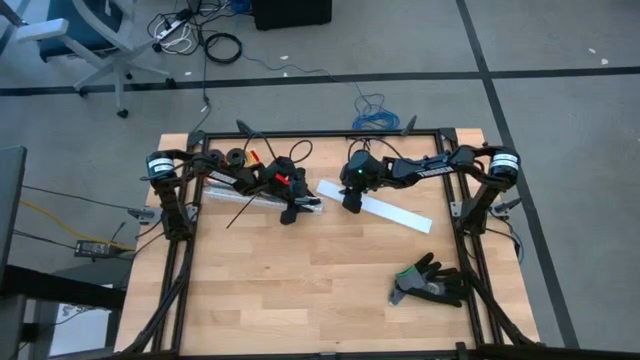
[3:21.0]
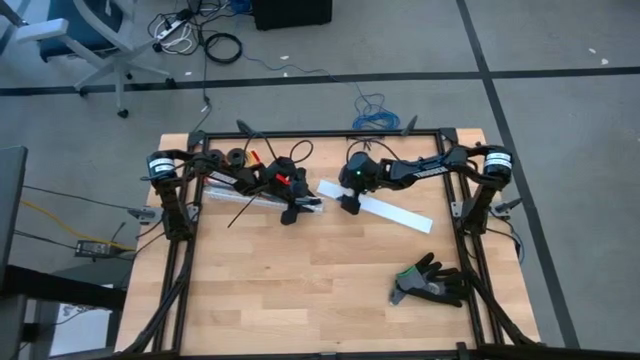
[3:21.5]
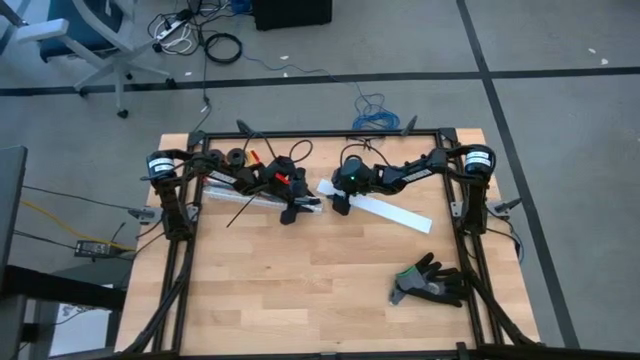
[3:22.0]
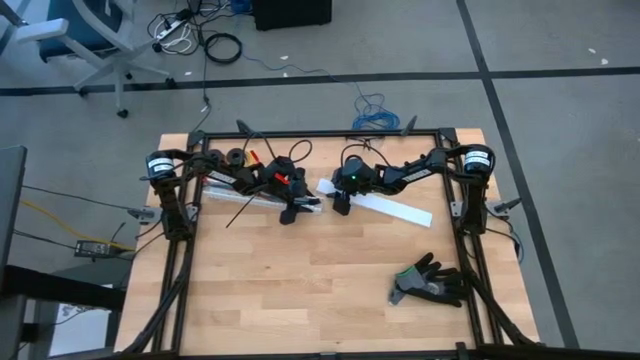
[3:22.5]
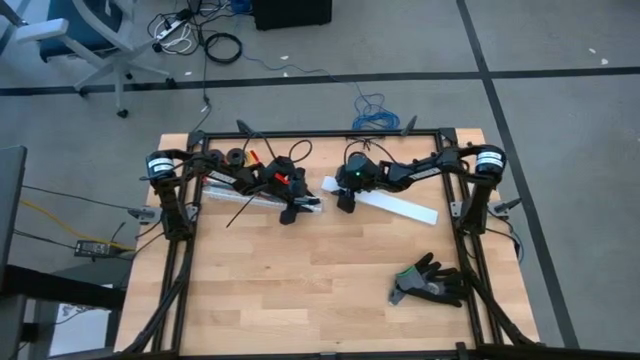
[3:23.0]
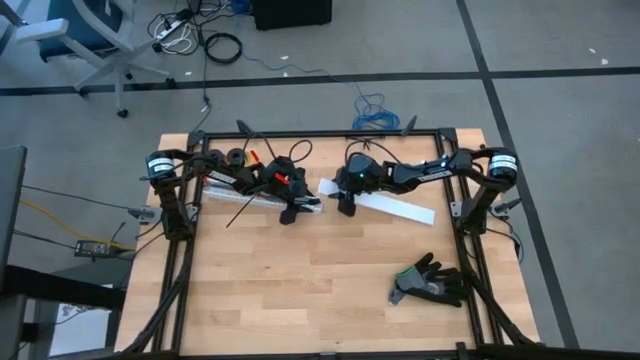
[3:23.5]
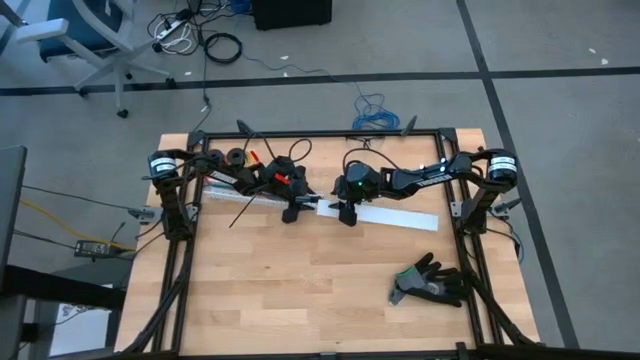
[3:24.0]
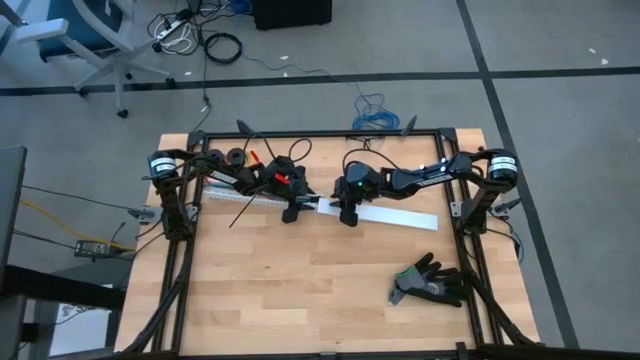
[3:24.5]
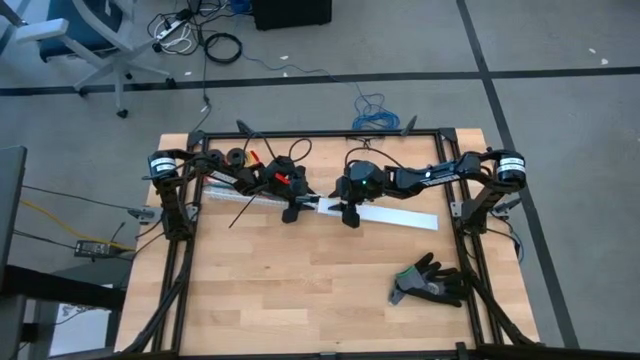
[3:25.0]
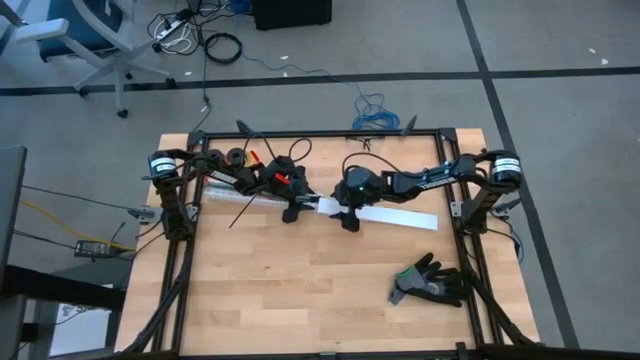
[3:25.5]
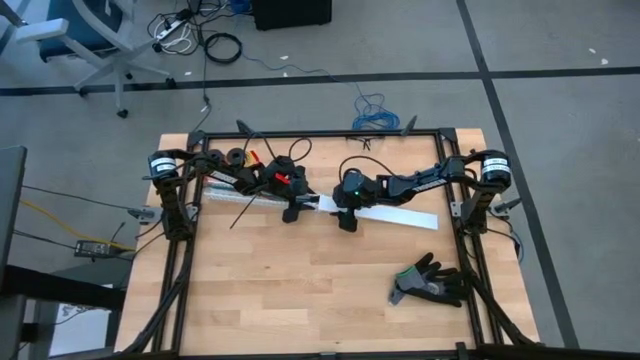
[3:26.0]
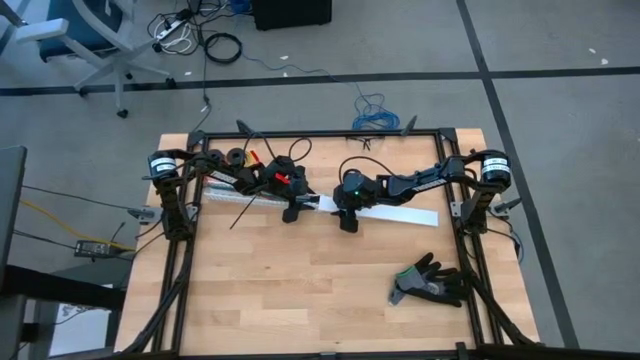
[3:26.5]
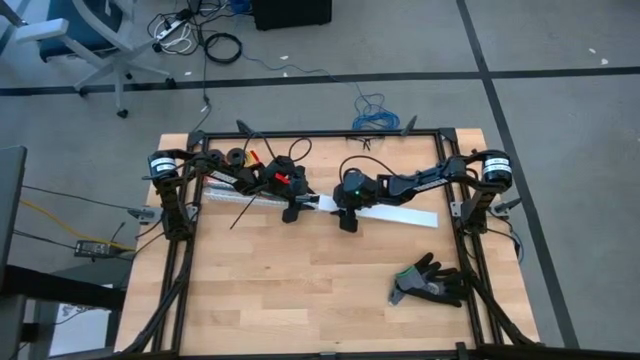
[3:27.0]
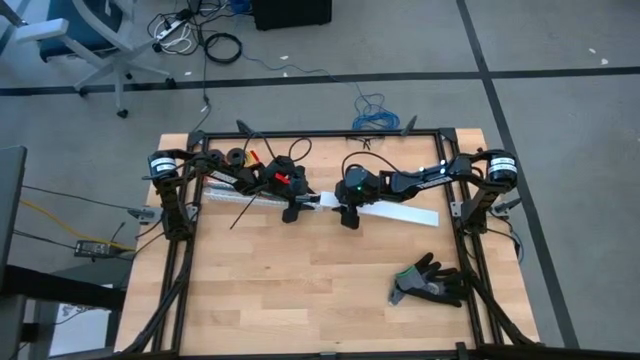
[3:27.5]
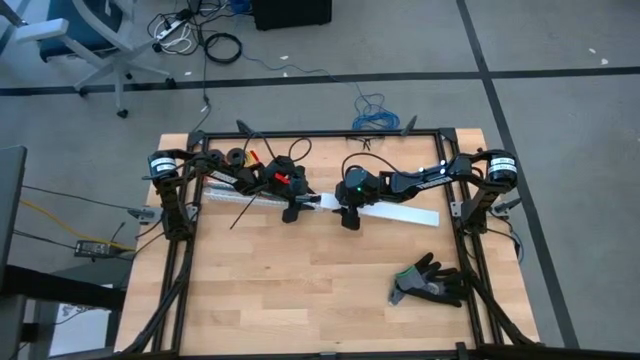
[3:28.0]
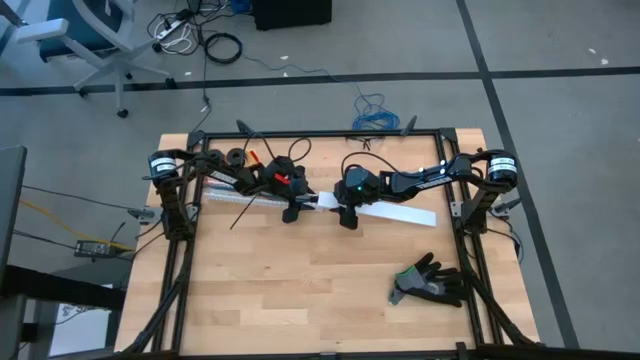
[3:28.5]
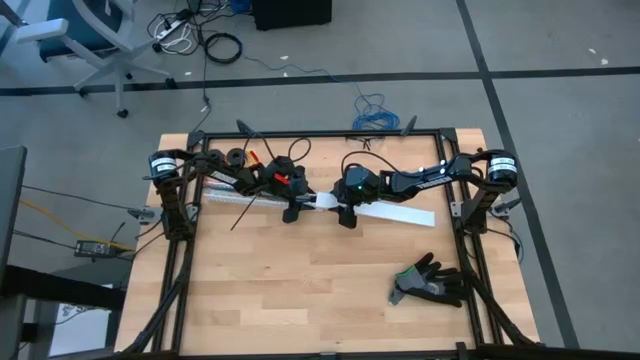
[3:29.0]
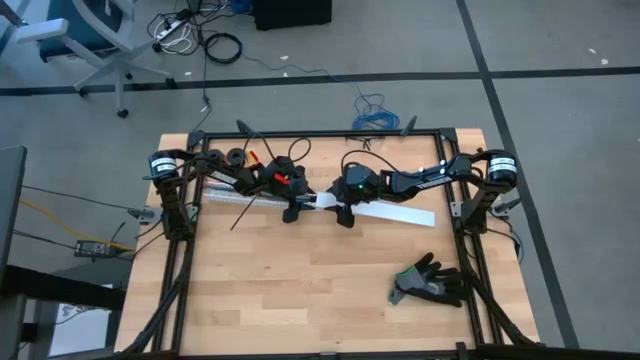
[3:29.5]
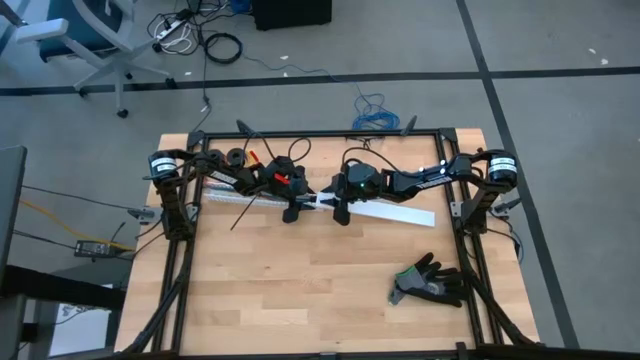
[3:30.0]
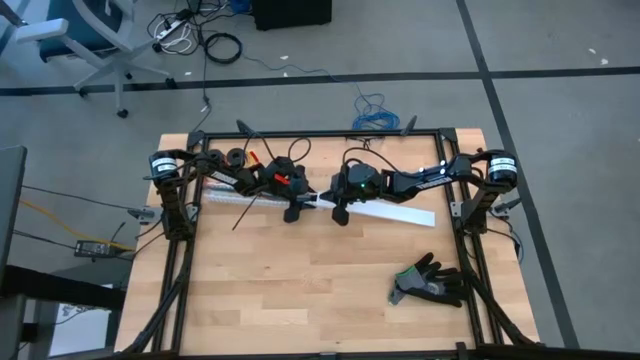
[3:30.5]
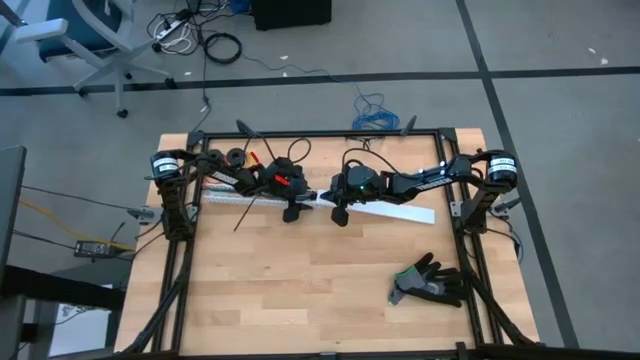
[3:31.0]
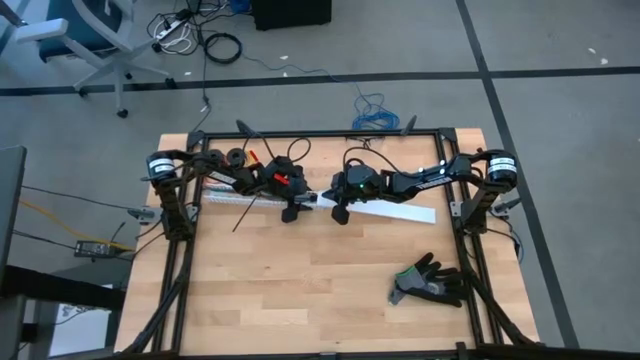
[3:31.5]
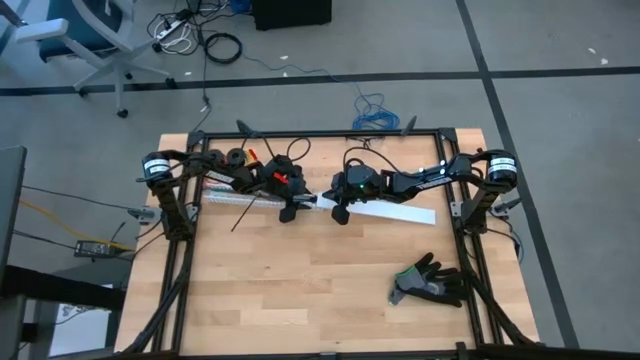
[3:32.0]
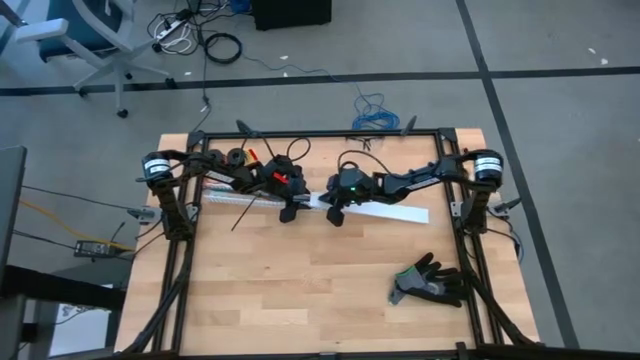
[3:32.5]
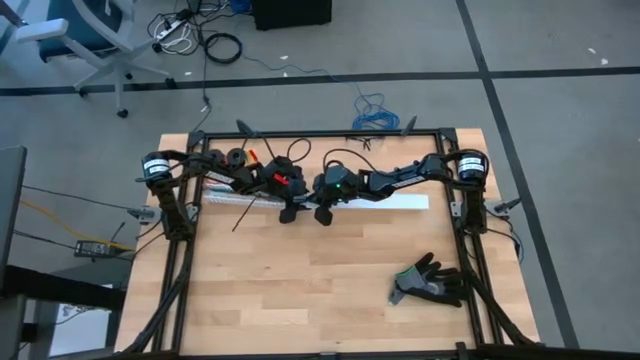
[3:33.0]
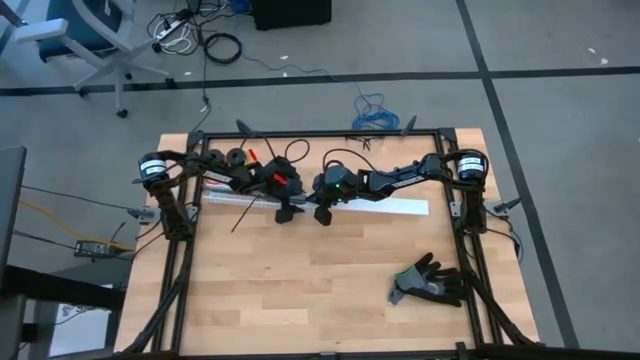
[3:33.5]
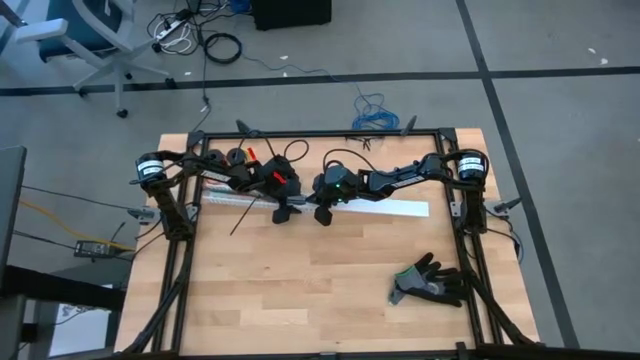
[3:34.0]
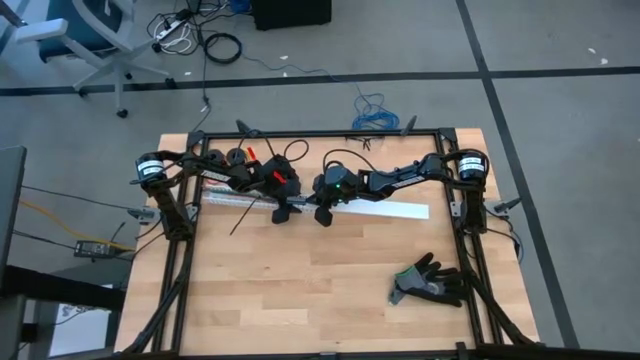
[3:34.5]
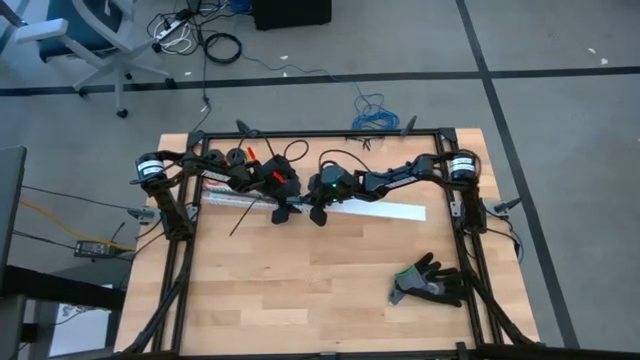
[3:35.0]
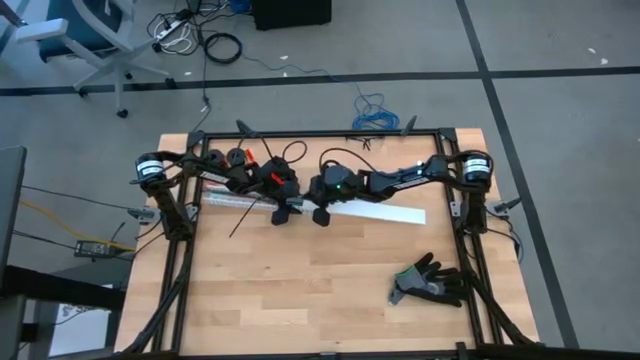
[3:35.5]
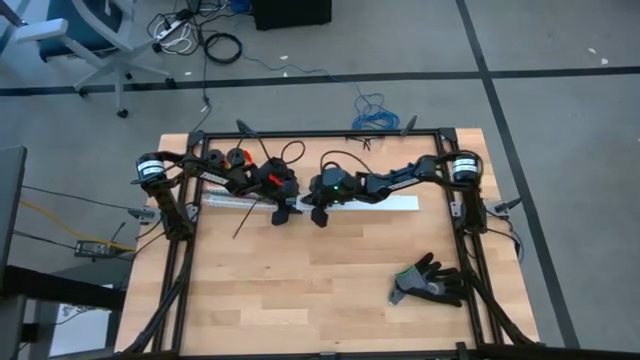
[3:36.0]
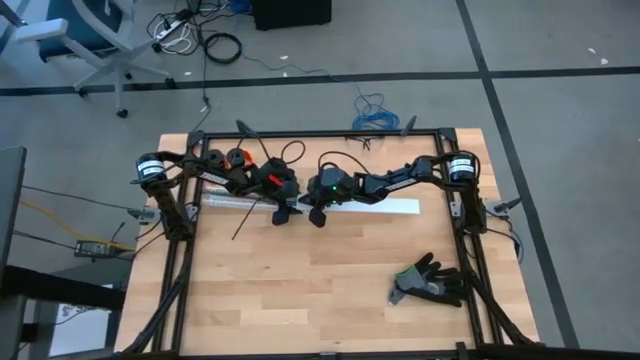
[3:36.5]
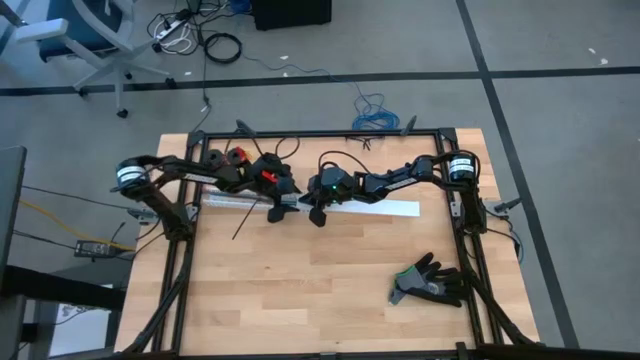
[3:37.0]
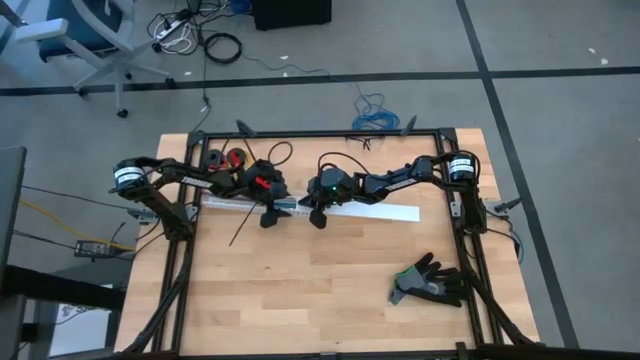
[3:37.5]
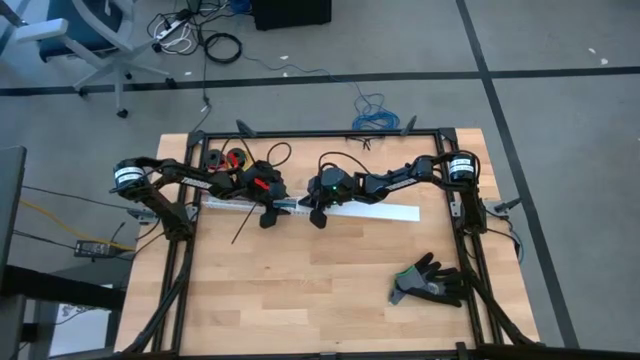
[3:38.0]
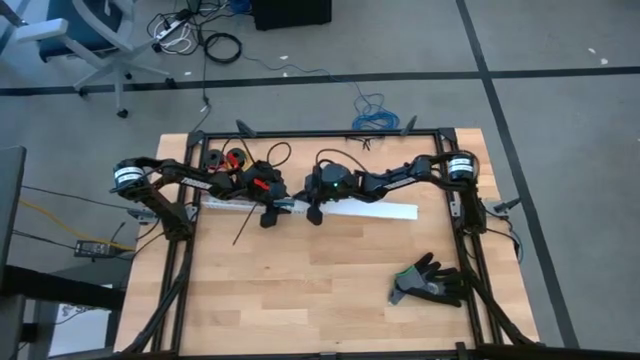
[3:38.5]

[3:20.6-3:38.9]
Task: Ziptie cables
Close the white cable duct

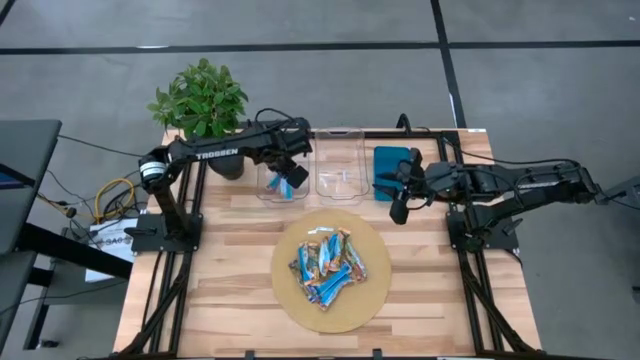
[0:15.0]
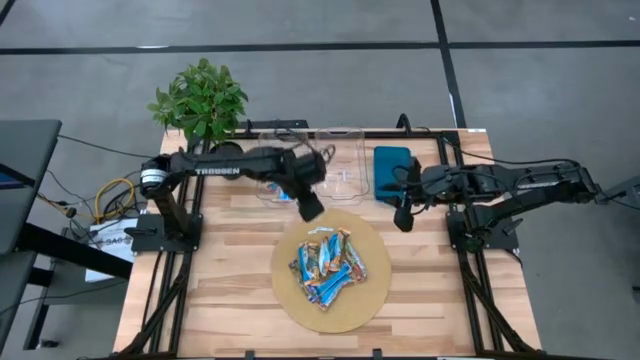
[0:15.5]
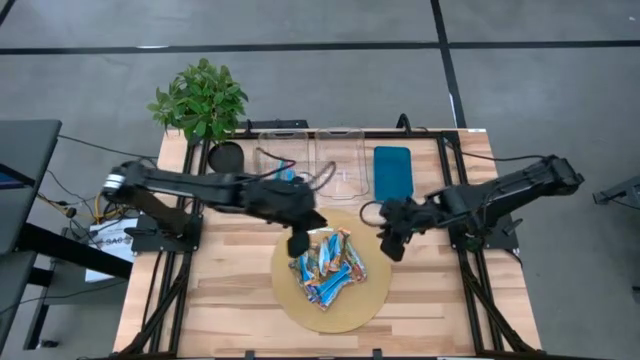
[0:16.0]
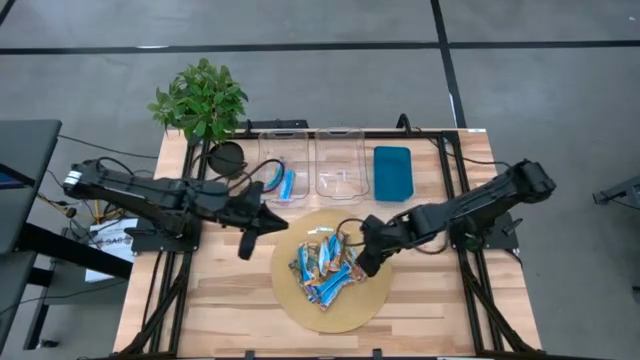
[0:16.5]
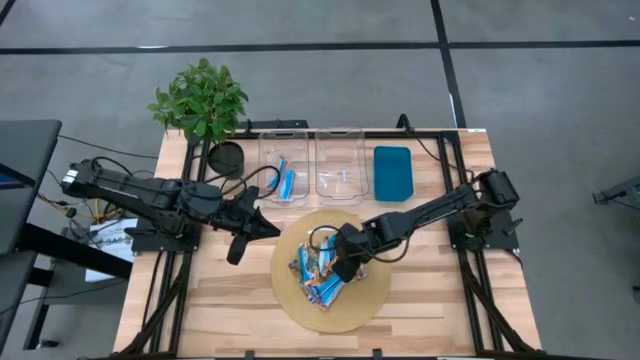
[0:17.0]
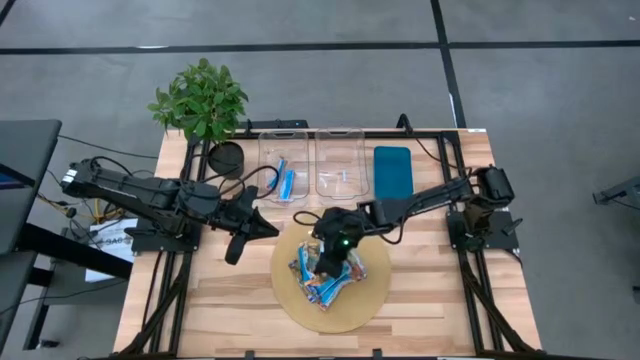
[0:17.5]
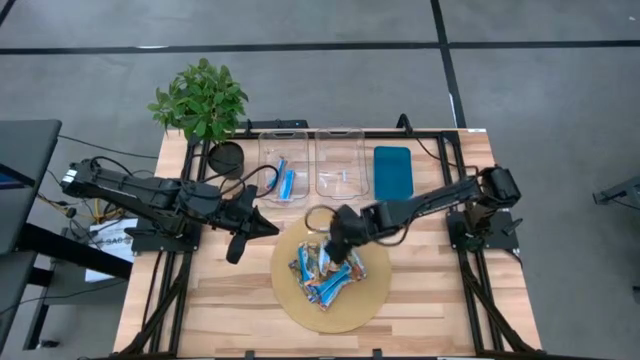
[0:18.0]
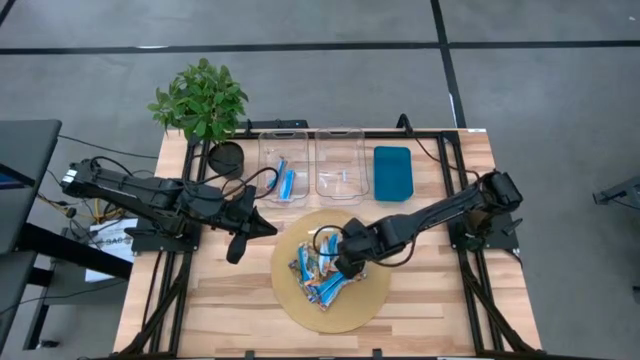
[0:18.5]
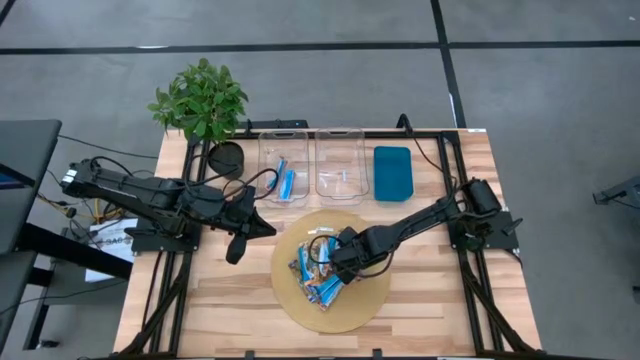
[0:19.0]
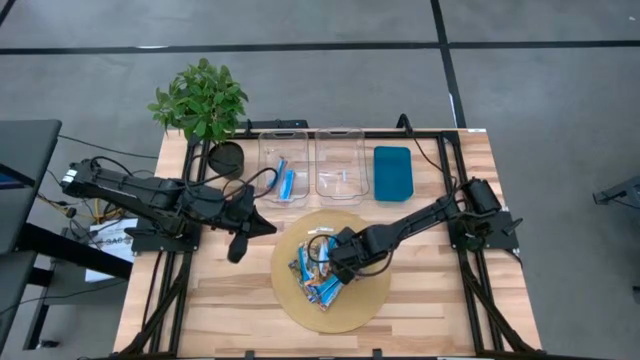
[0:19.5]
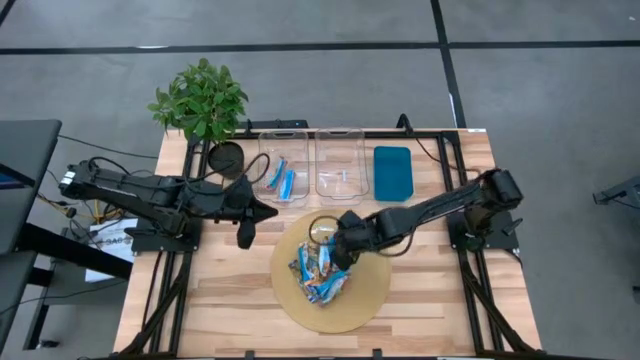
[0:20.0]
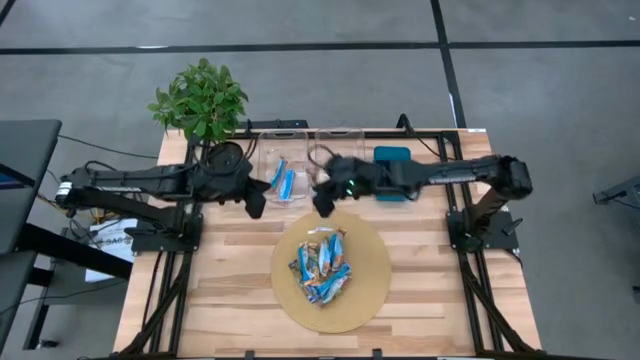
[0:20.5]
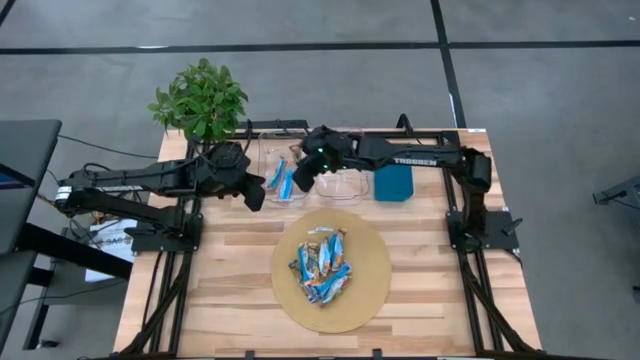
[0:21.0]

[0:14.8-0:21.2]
Task: Pick and place Granola Bars by type
Put the top red granola bar into the left transparent bin
